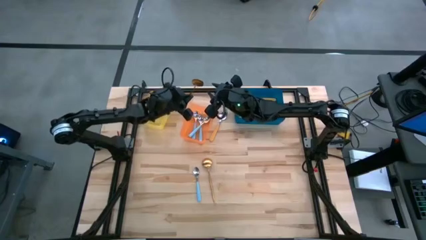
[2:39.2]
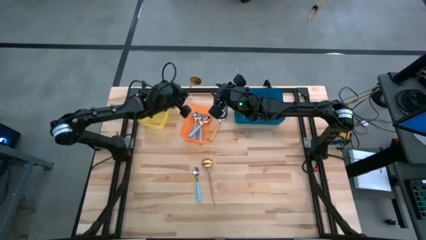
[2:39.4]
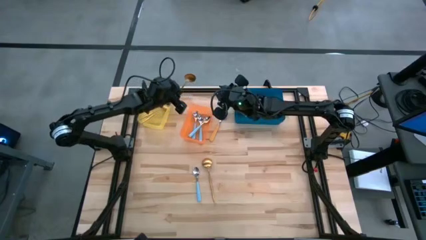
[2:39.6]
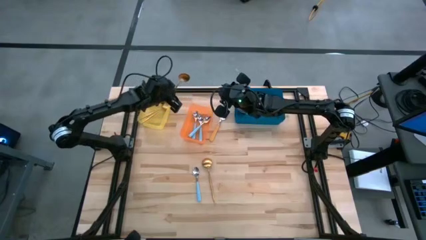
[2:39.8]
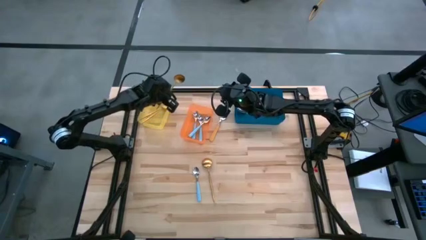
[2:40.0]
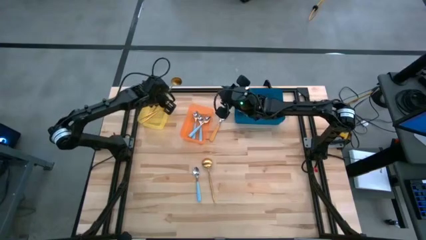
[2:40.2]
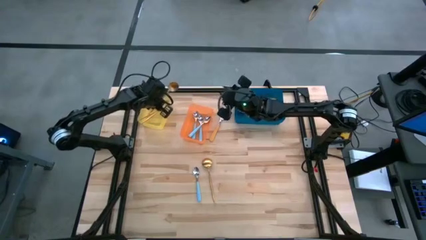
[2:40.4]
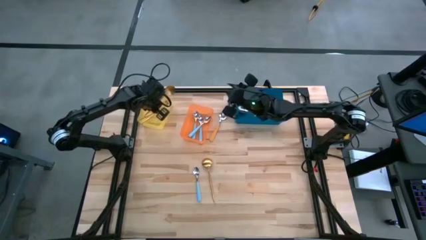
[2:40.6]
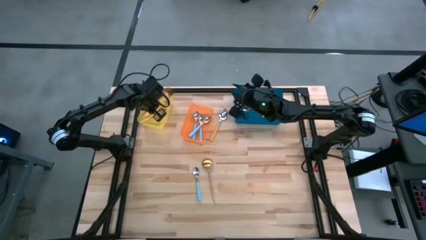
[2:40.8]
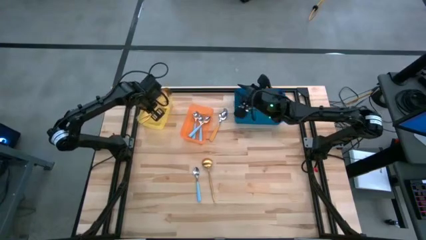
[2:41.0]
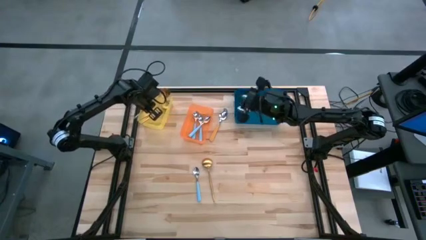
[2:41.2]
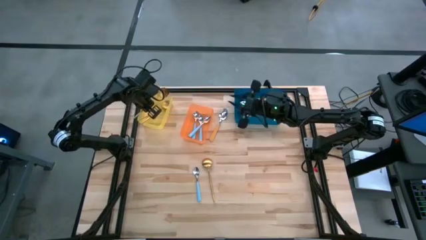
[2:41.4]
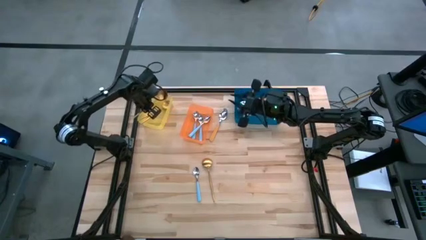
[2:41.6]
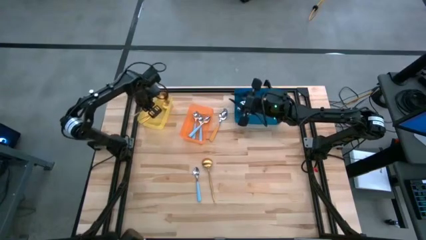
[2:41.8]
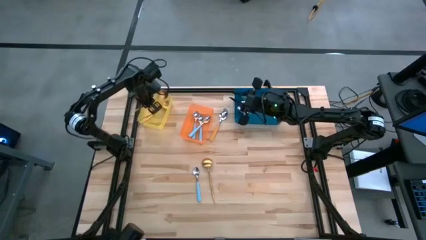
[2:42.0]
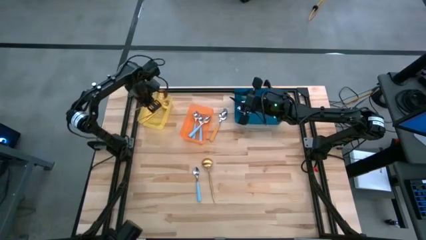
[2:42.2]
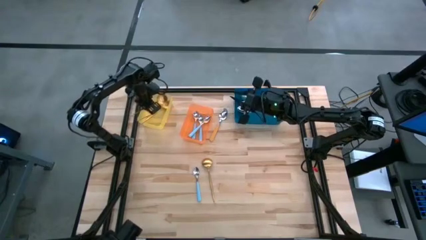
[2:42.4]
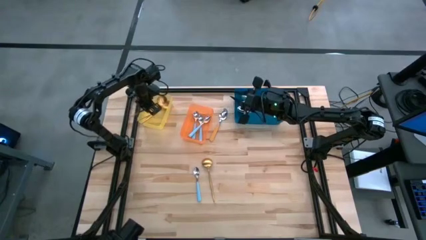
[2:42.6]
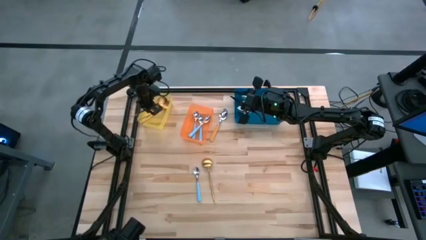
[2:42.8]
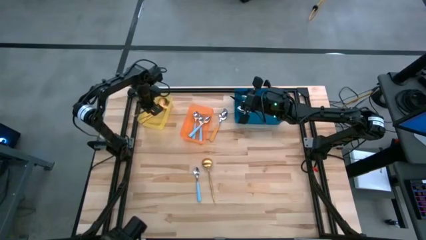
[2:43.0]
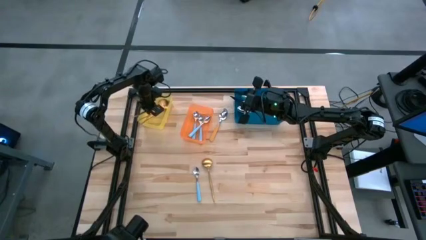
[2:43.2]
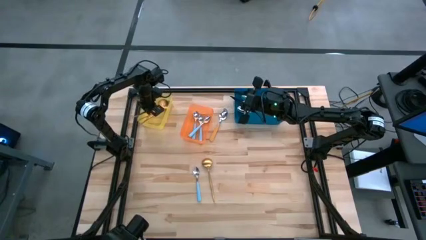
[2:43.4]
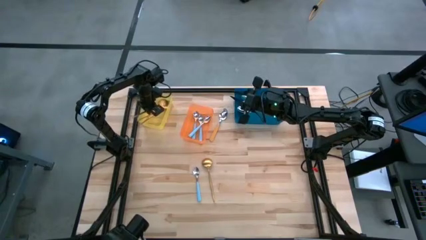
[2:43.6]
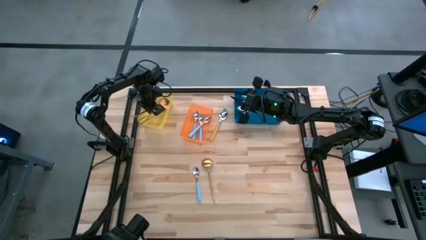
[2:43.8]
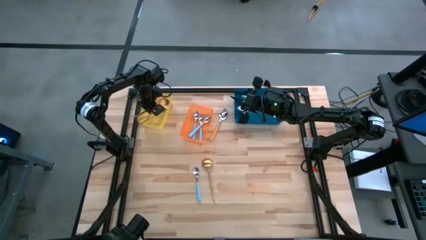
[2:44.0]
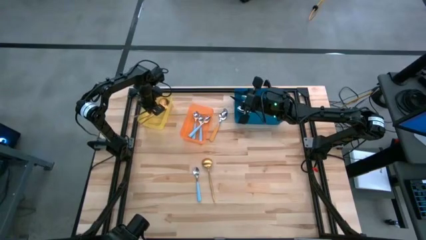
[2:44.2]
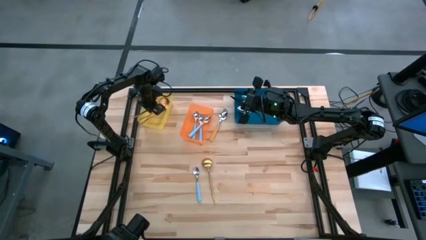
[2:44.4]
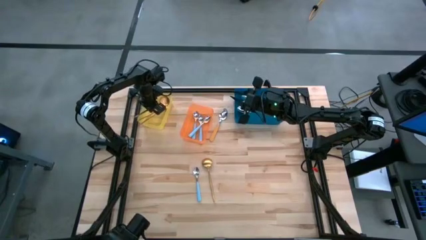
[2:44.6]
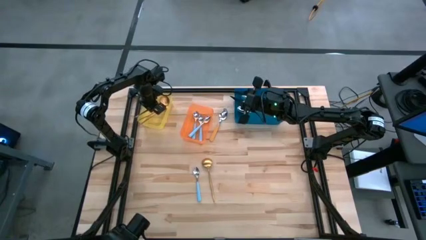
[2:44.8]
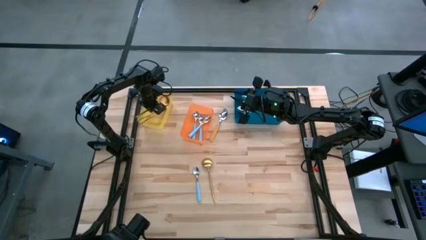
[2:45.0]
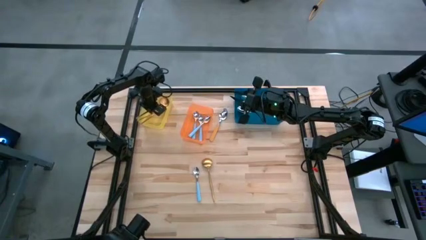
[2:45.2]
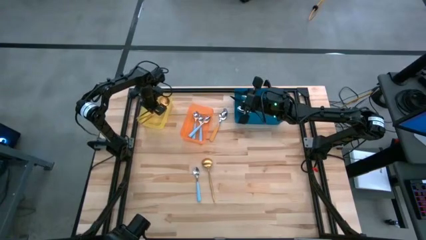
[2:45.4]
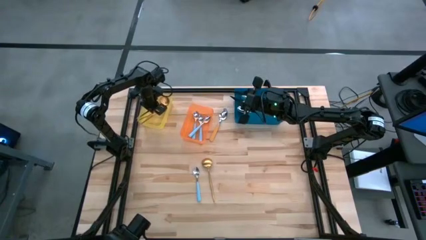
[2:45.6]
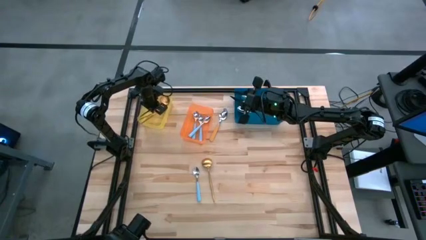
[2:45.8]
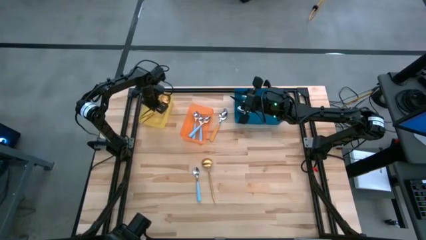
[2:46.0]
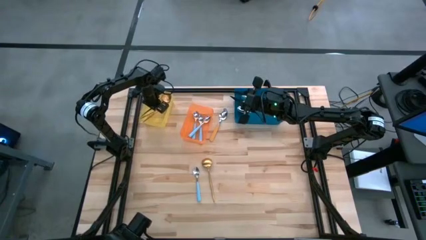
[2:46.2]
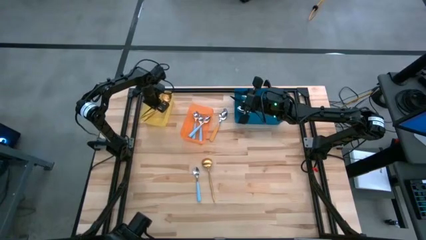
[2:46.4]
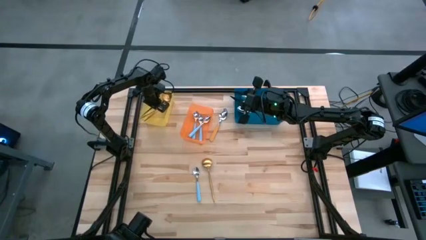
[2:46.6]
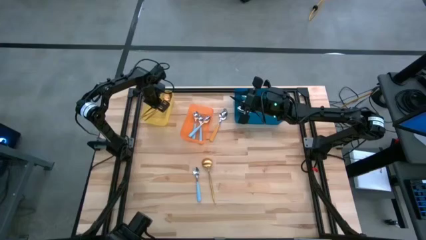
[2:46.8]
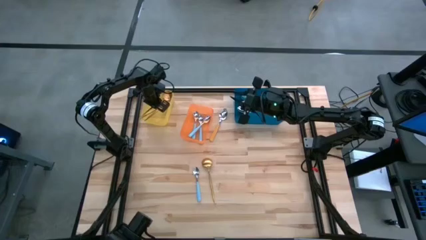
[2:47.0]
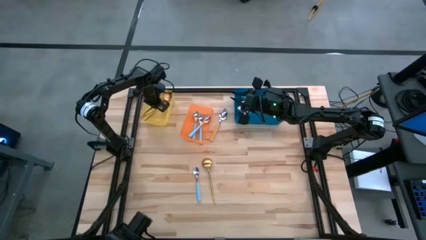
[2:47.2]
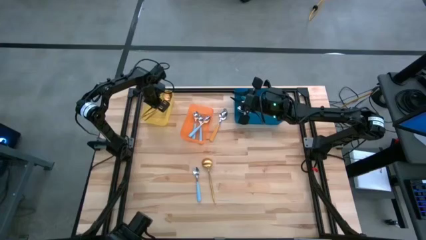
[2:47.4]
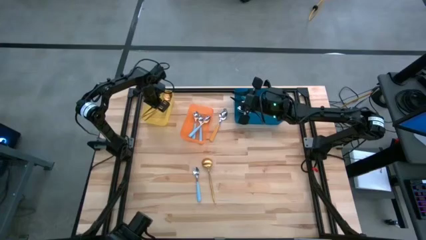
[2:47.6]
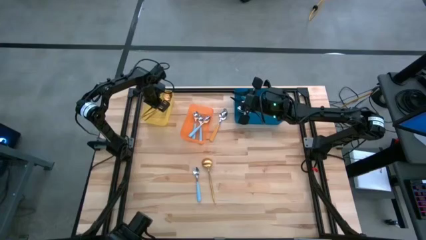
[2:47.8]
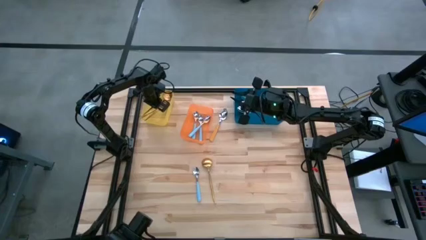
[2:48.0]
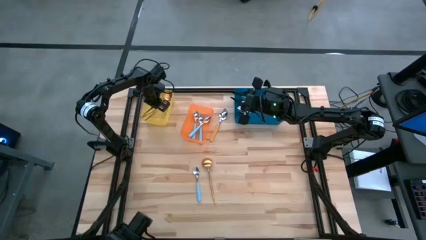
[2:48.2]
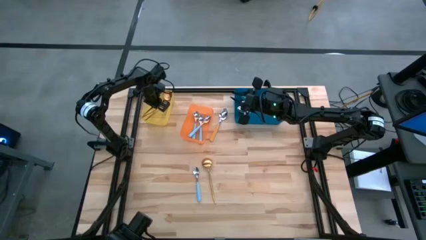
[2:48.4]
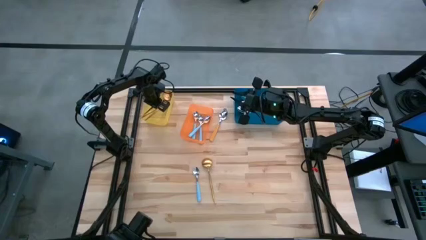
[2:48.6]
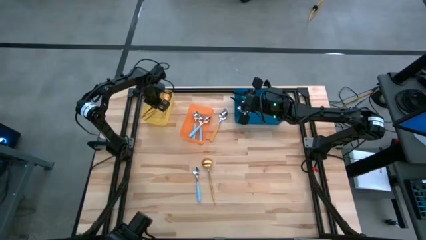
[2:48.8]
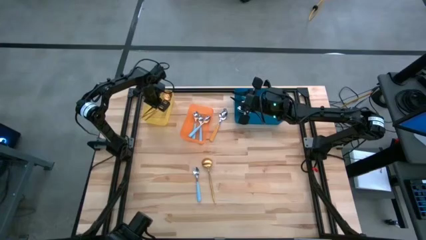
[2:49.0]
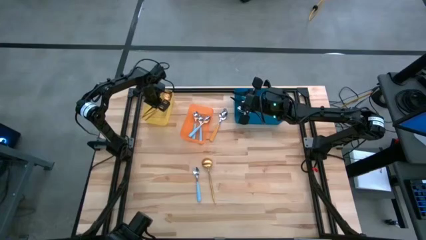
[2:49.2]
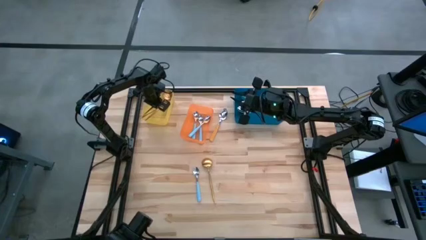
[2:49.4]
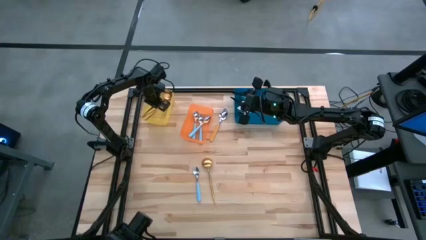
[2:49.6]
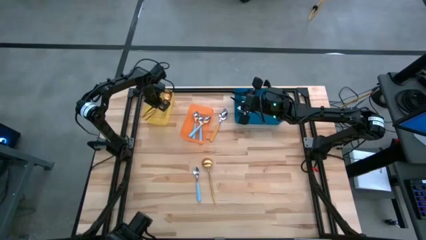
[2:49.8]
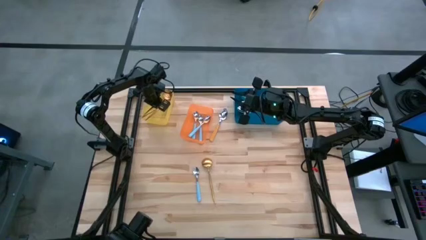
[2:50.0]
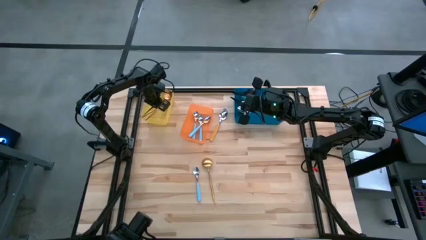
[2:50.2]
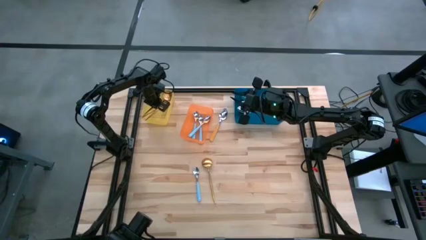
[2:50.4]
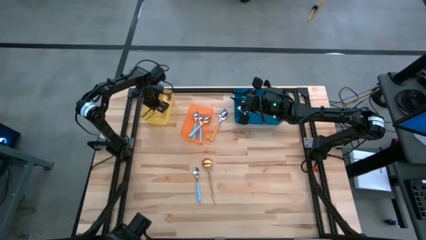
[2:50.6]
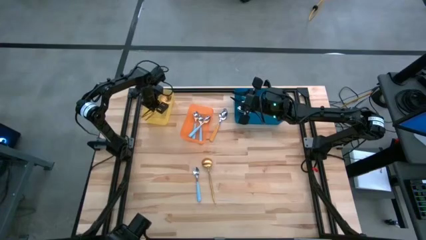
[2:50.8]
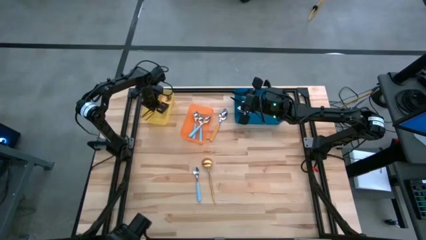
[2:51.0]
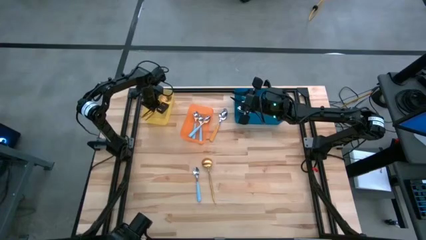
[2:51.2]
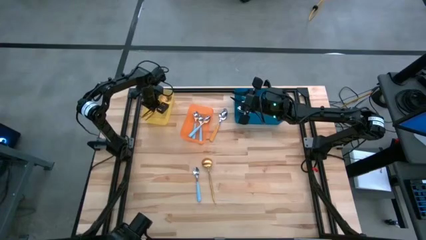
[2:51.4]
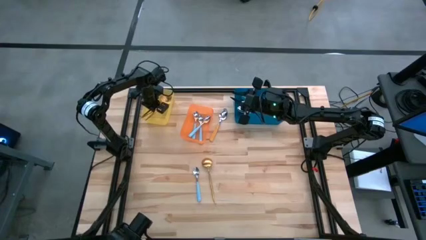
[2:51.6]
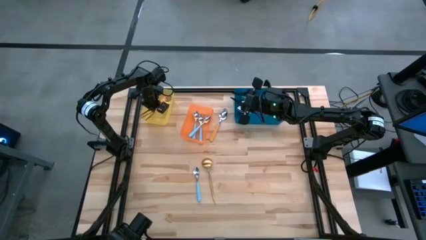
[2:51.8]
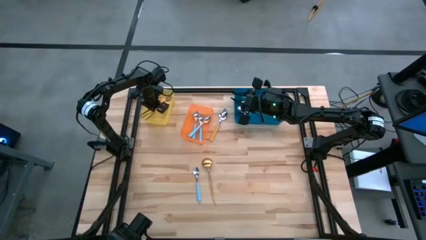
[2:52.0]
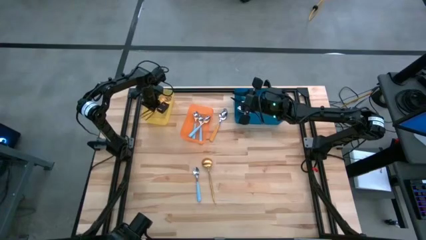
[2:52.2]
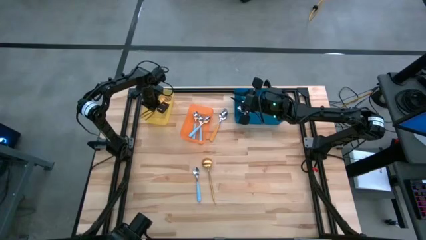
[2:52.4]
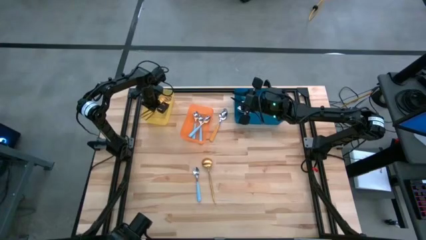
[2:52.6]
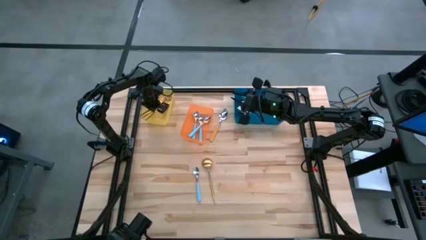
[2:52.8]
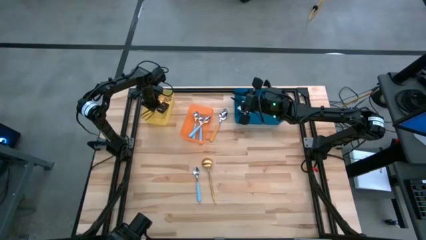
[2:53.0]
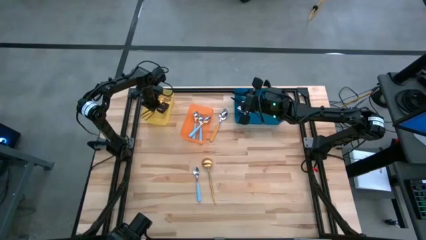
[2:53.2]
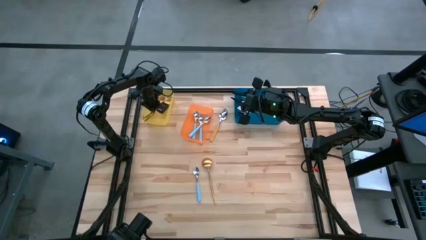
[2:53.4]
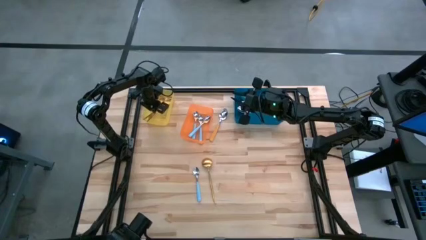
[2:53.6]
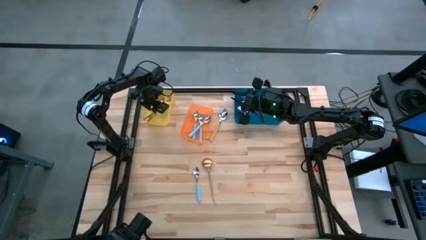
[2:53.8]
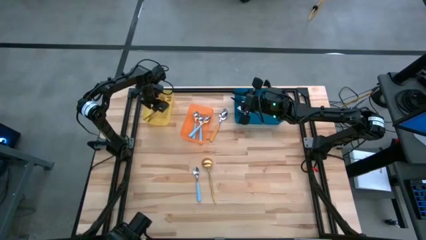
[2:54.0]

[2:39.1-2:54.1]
Task: Sort silverware by color (type)
Put the gold spoon into the yellow bin
